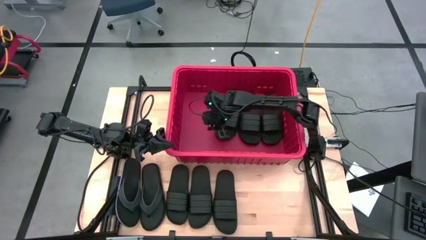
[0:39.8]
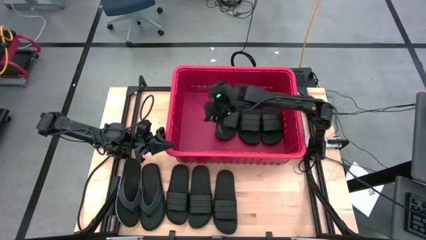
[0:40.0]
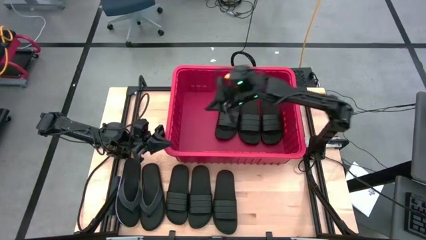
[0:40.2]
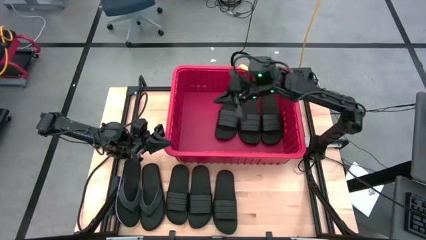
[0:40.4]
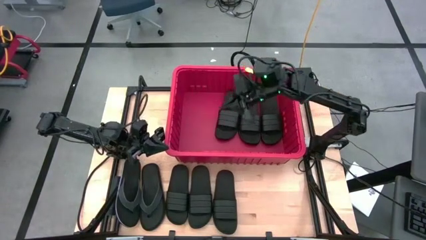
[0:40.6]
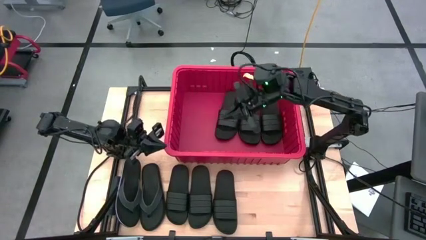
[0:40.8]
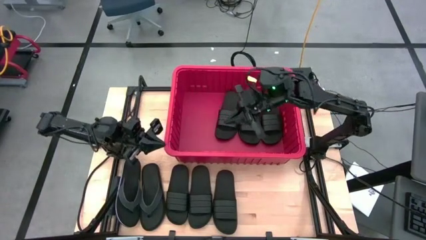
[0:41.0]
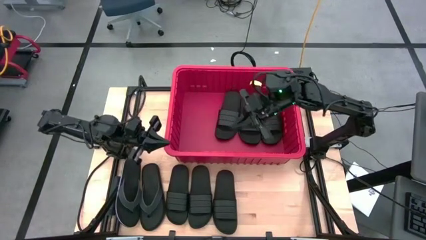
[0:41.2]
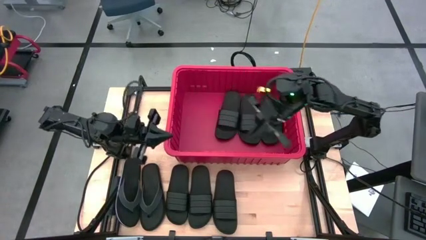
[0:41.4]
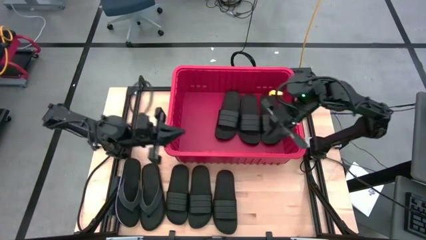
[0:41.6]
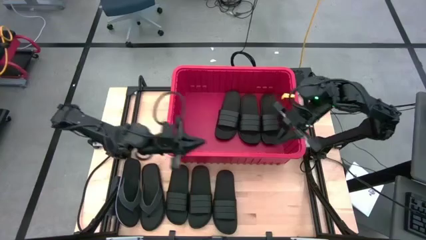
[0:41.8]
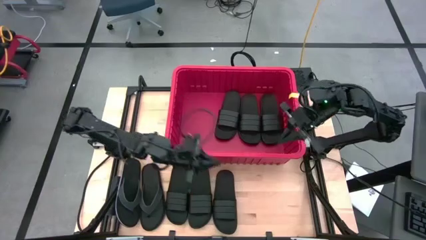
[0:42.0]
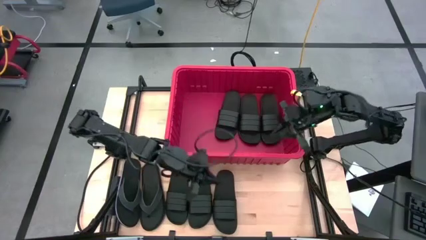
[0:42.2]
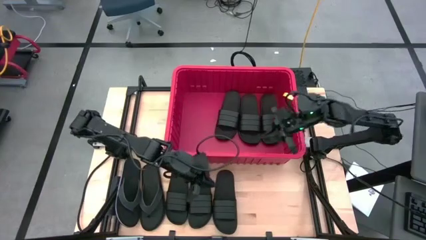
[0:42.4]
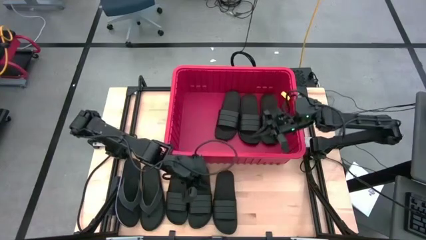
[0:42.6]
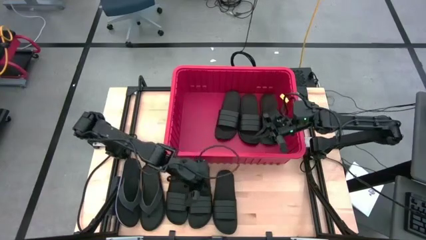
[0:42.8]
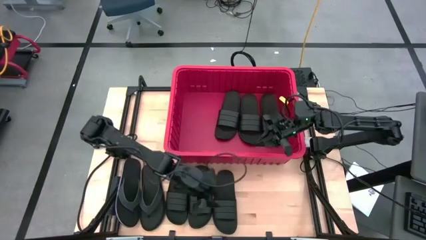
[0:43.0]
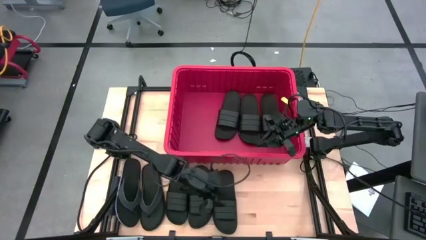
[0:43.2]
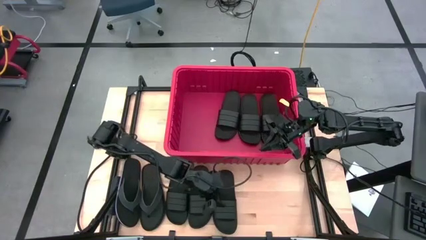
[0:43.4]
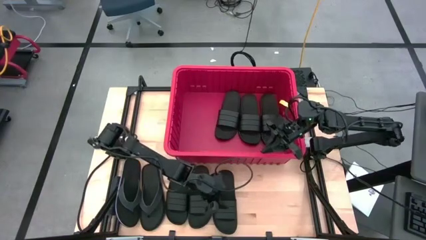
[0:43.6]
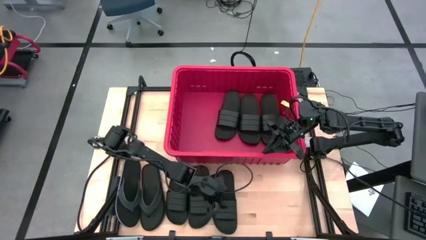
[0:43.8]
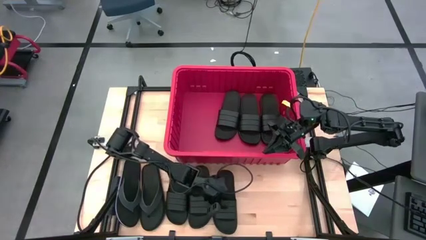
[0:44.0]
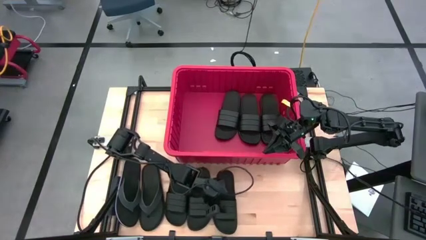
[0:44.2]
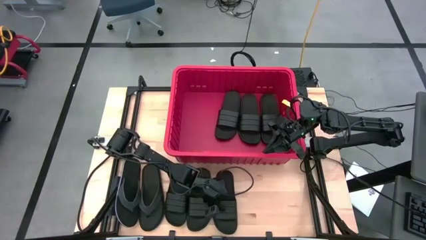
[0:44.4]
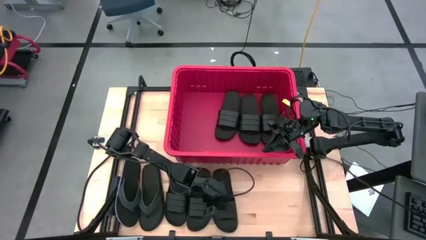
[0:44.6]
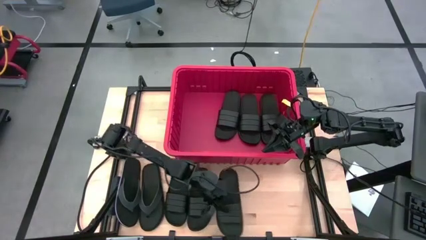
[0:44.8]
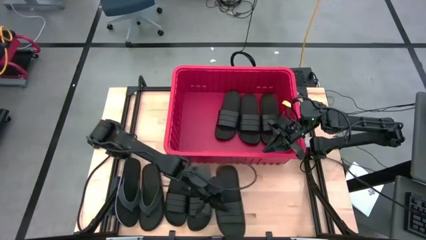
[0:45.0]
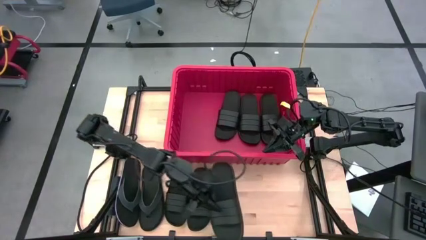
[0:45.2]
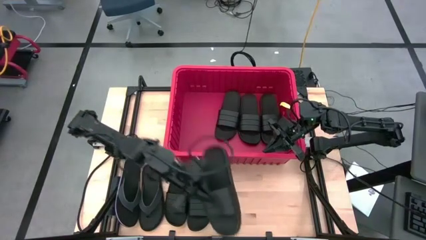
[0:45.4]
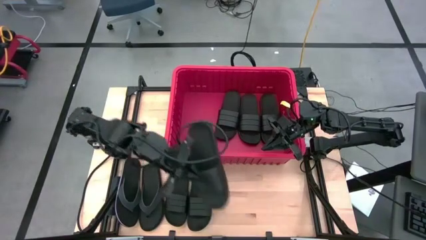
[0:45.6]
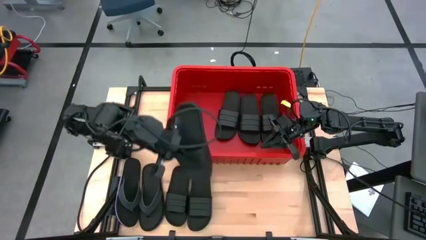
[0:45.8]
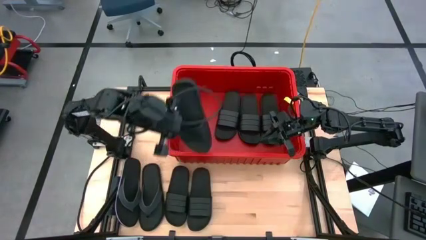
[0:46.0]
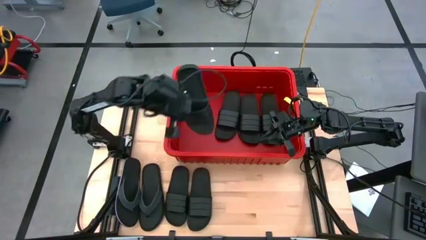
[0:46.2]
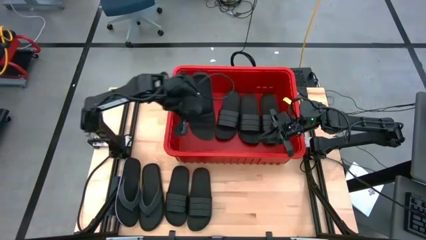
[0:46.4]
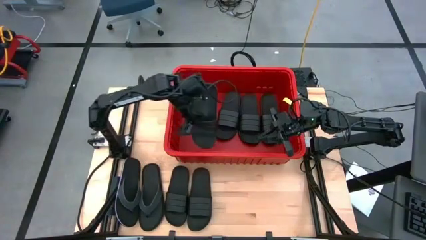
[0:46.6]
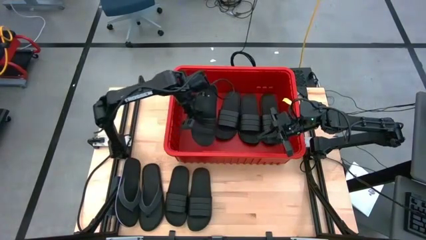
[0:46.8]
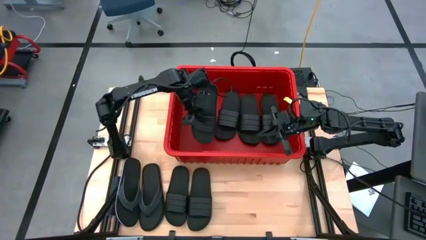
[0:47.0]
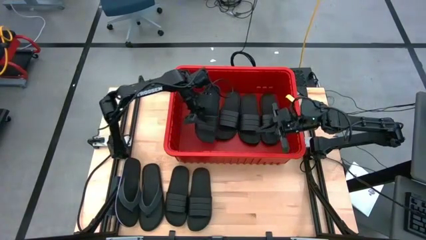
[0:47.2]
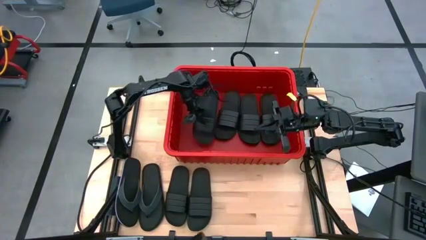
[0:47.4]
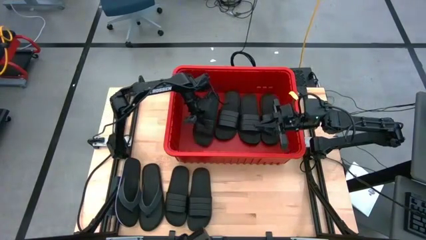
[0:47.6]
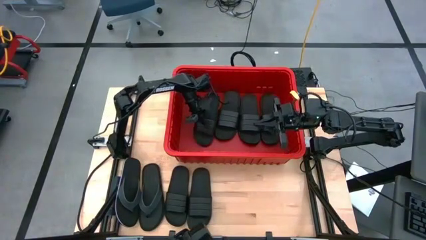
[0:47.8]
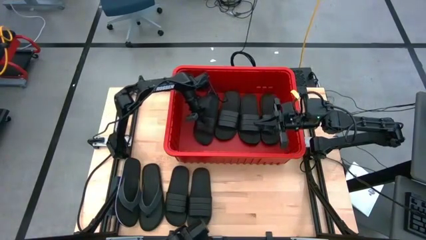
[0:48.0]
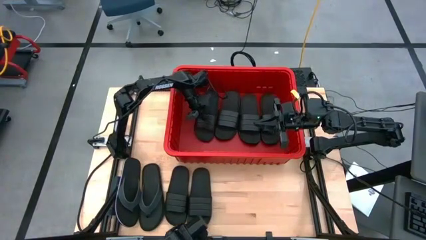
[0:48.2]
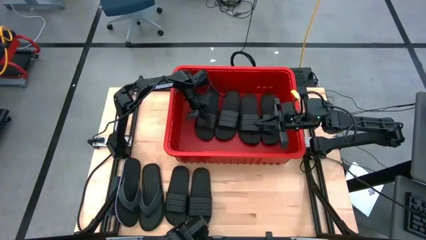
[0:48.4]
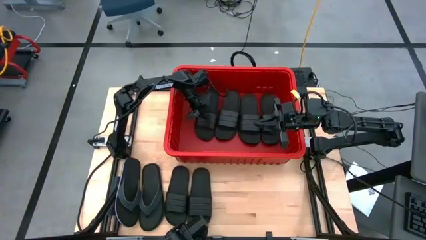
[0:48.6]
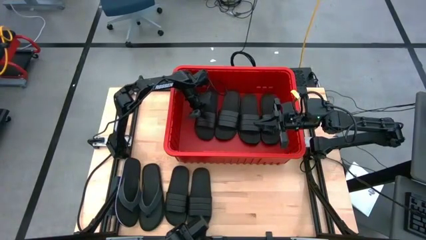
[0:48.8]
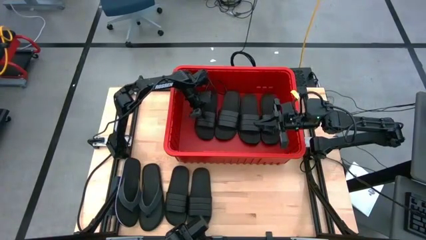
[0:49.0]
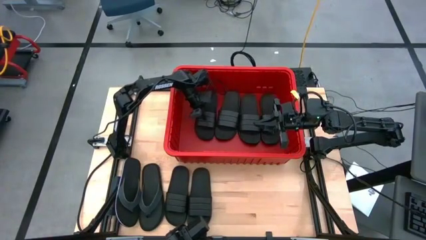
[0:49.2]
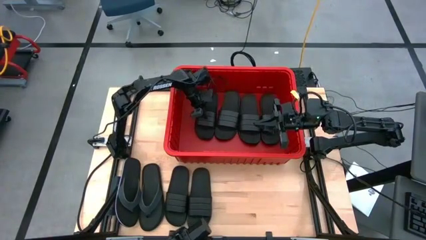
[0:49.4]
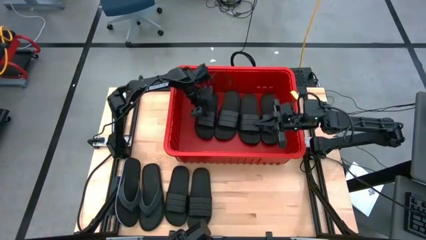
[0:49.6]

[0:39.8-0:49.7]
Task: Pick and place slides into bin
Put the right black slide into the red bin
